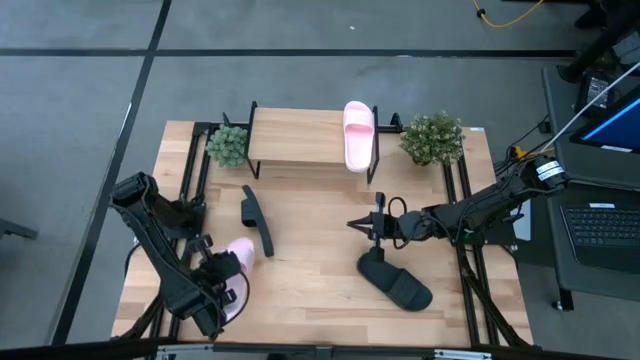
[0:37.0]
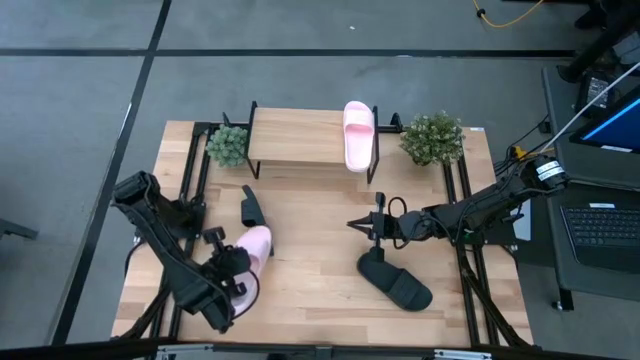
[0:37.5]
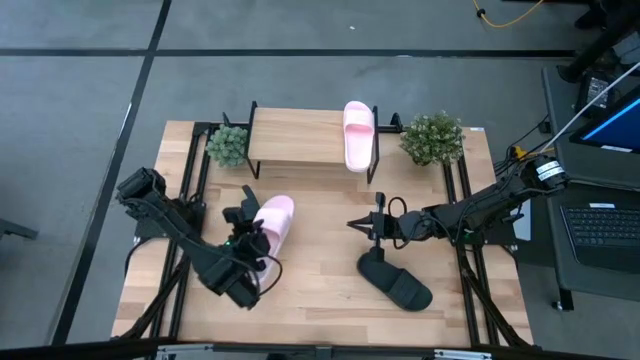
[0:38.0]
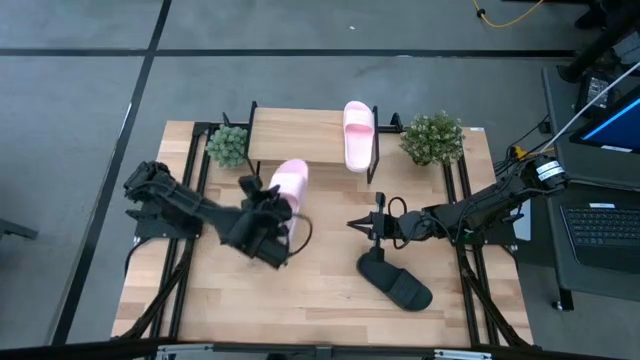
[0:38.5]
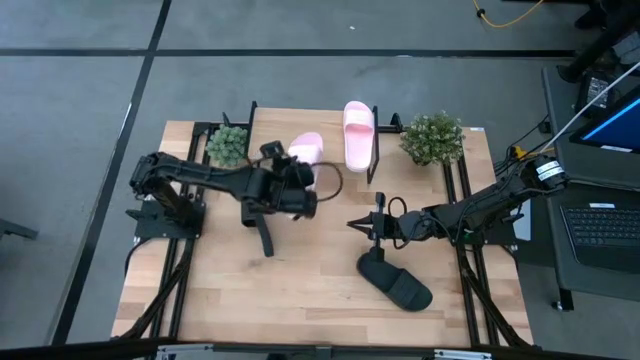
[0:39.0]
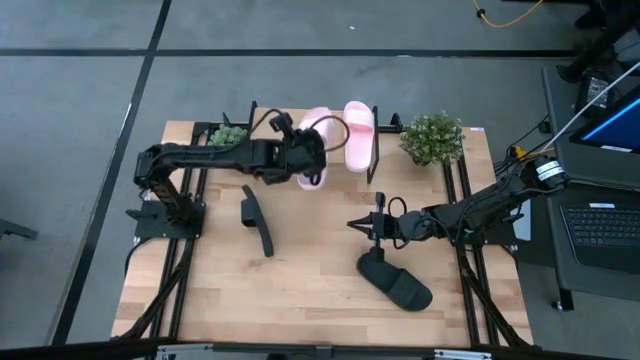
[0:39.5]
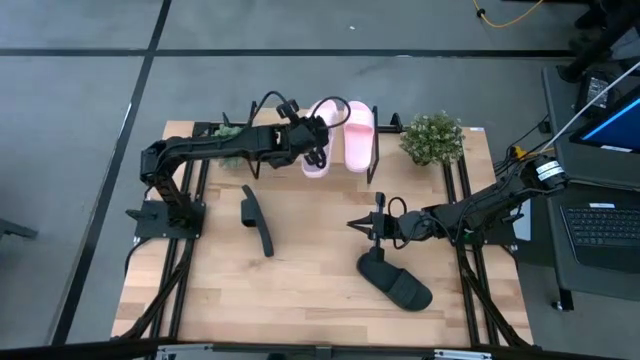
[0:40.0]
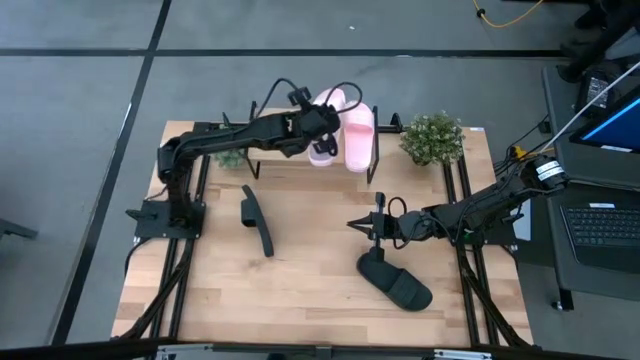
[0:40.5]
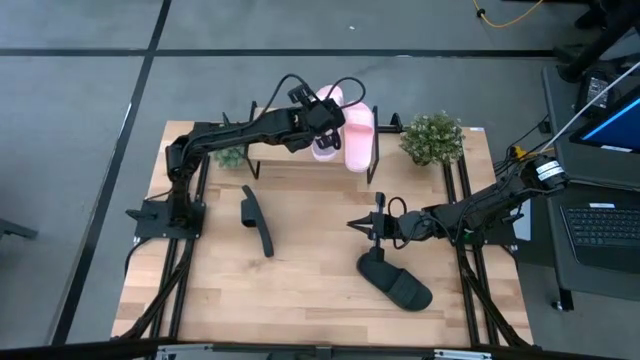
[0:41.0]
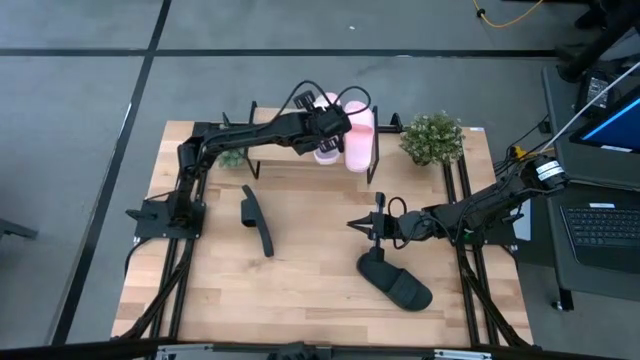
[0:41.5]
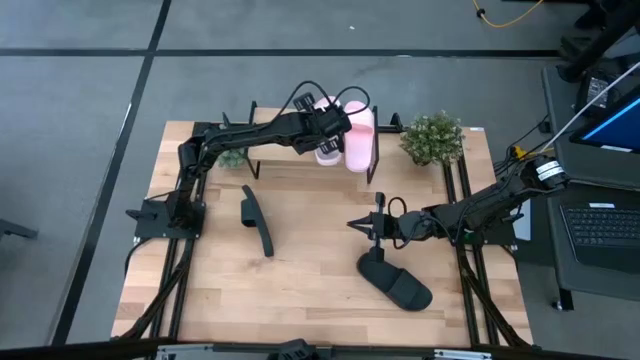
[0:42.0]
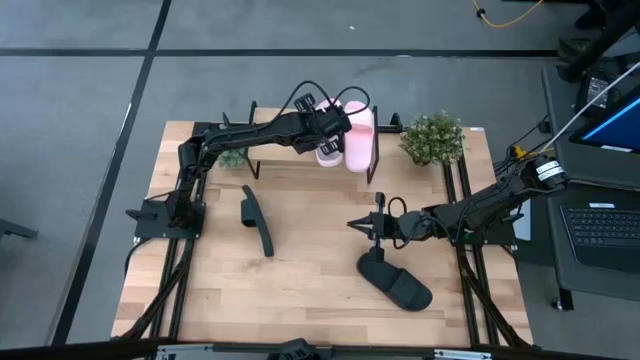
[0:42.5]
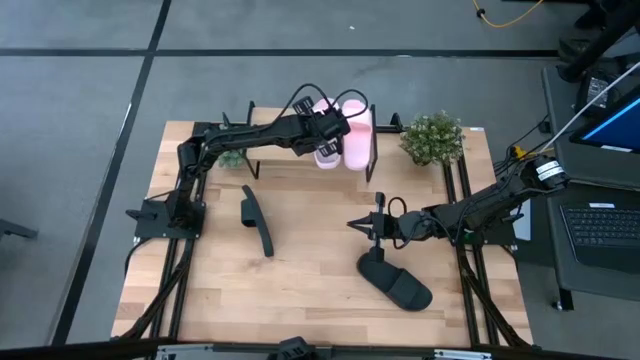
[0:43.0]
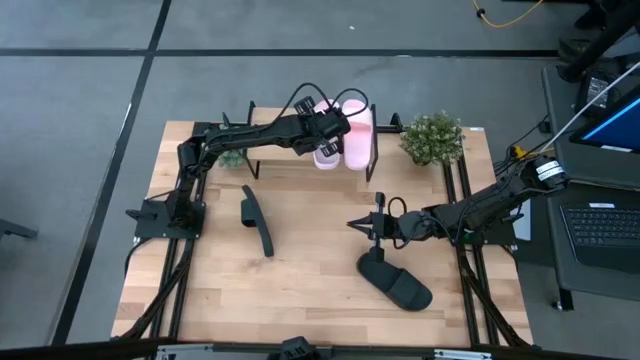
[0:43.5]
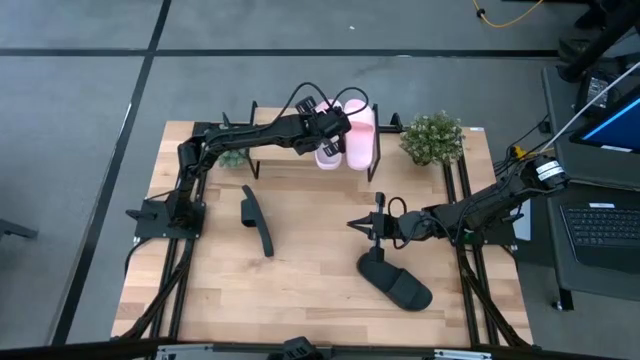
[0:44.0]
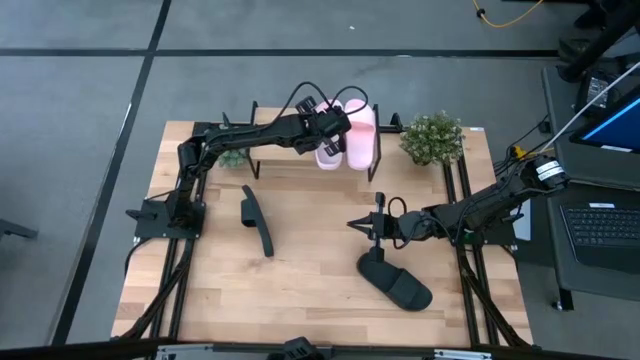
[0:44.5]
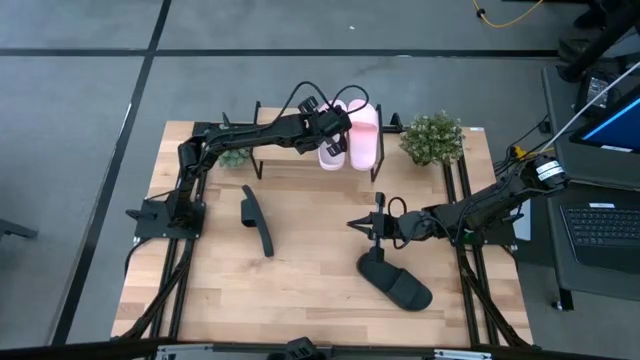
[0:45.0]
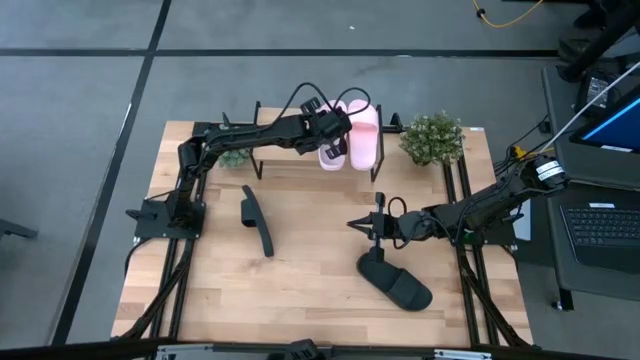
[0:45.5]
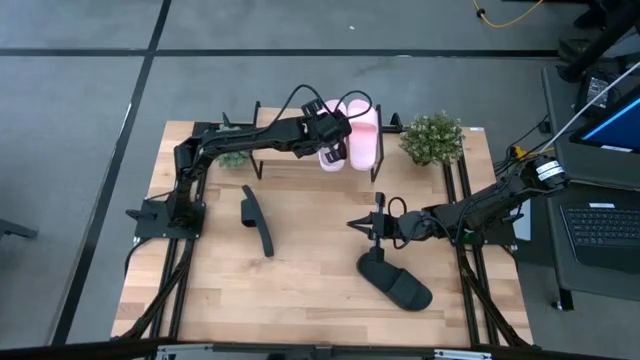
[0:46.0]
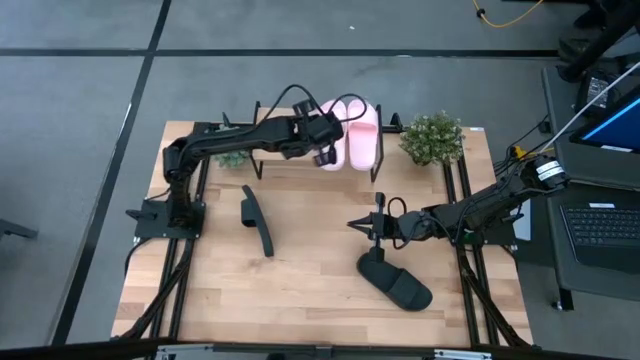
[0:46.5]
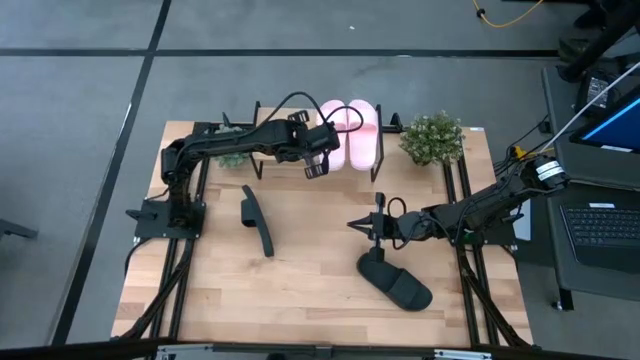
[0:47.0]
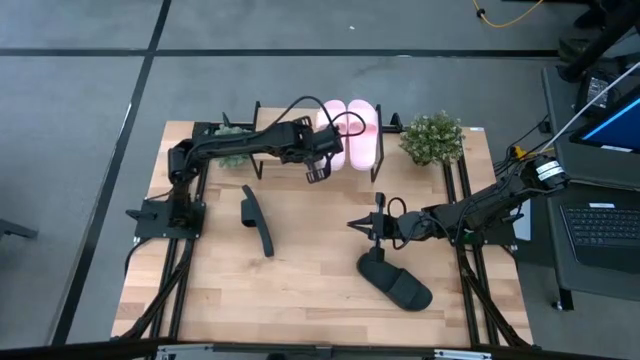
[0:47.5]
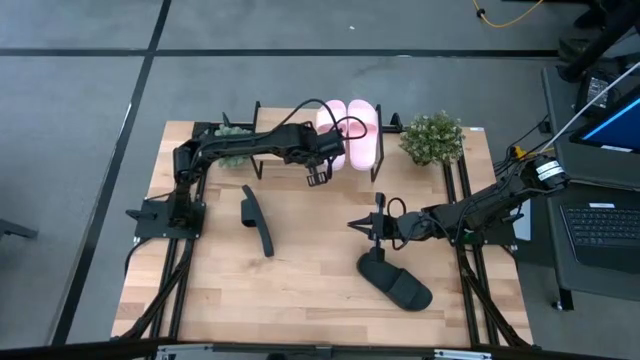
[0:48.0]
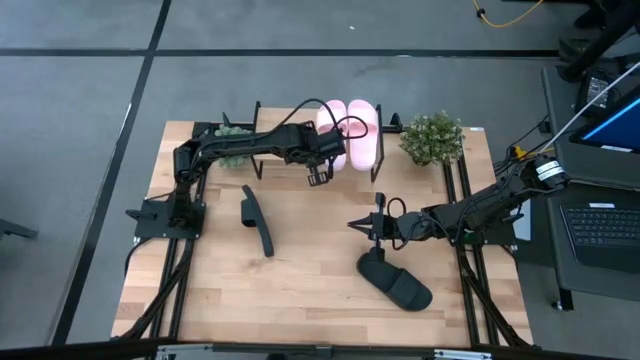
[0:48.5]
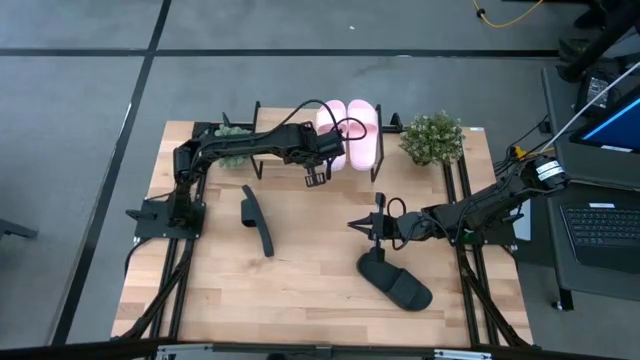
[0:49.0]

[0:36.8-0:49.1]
Task: Pick and place slides into the shelf
Put the pink slipper on the shelf

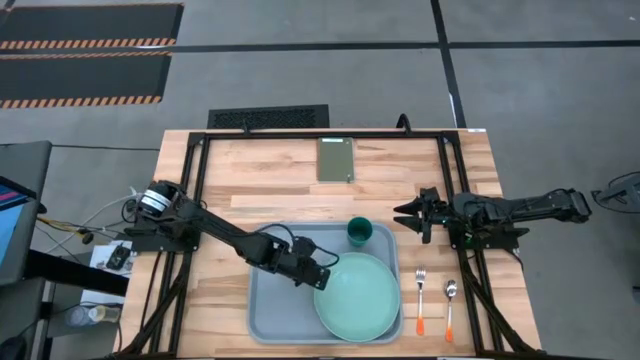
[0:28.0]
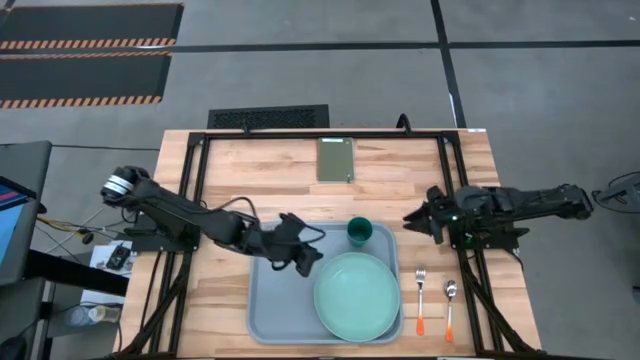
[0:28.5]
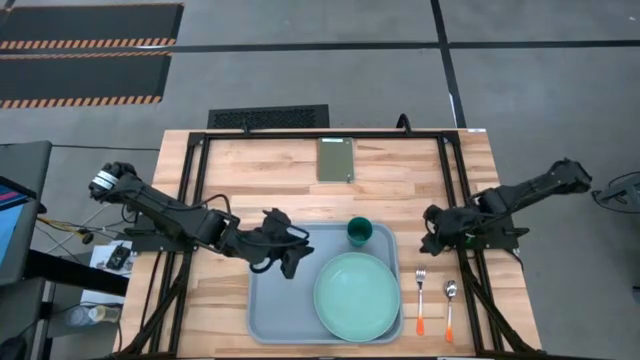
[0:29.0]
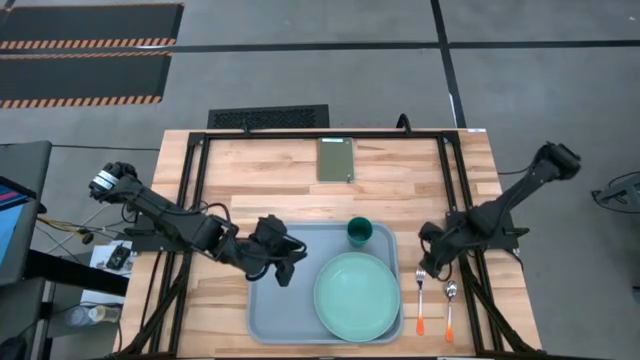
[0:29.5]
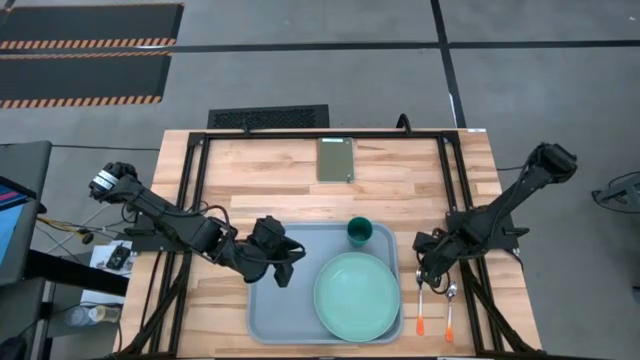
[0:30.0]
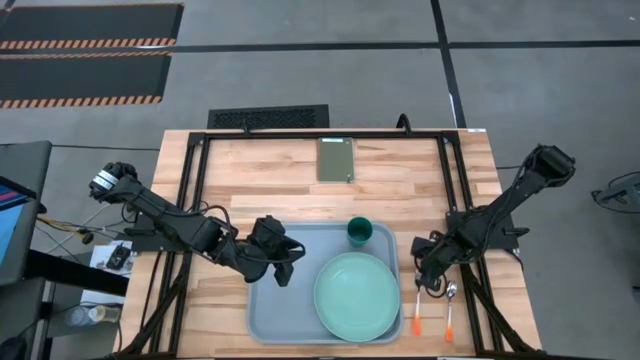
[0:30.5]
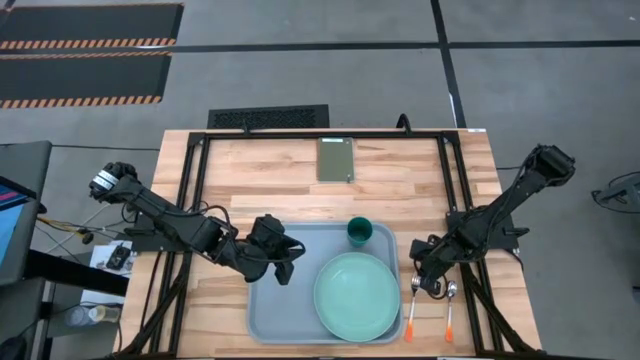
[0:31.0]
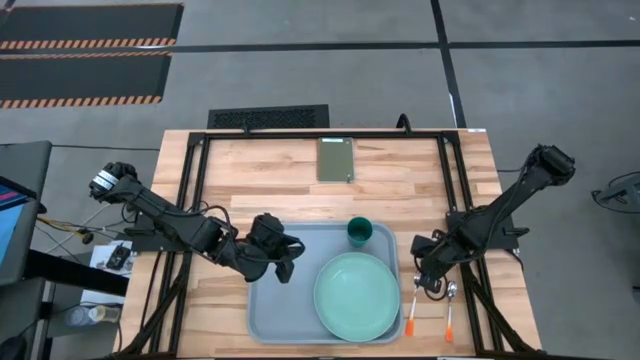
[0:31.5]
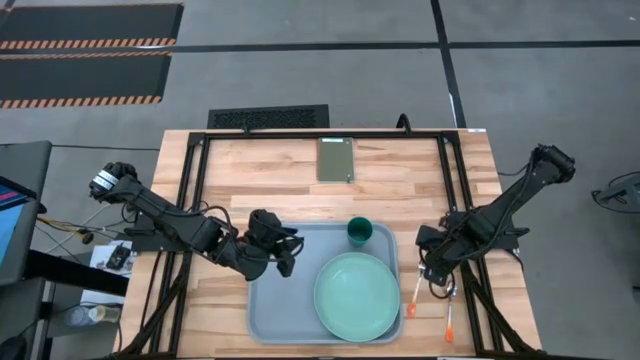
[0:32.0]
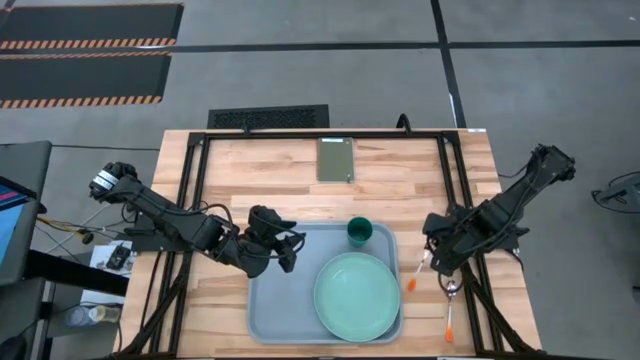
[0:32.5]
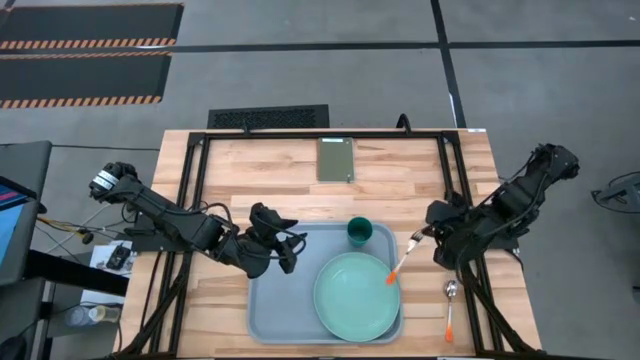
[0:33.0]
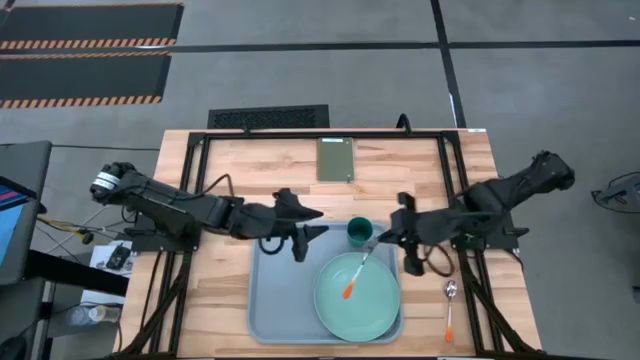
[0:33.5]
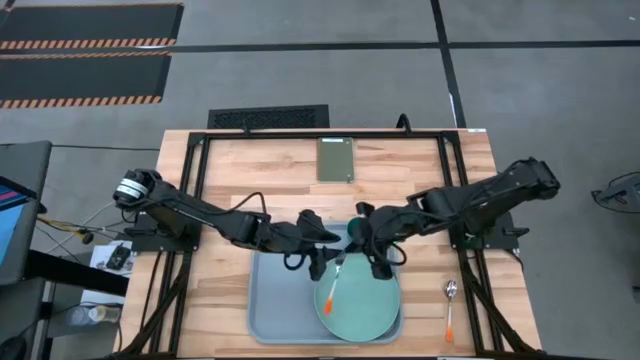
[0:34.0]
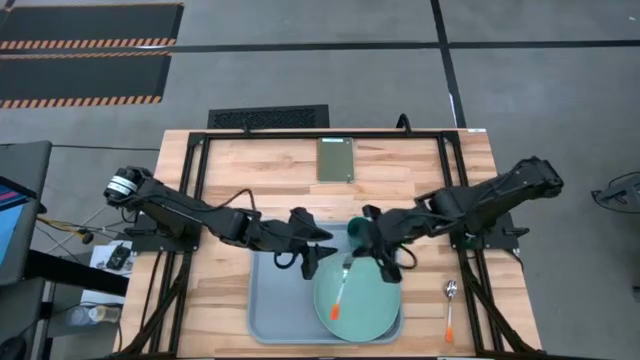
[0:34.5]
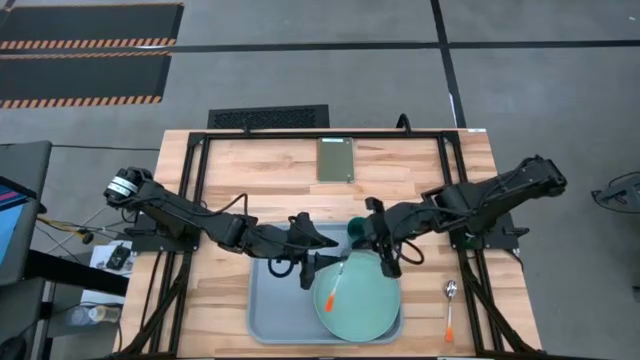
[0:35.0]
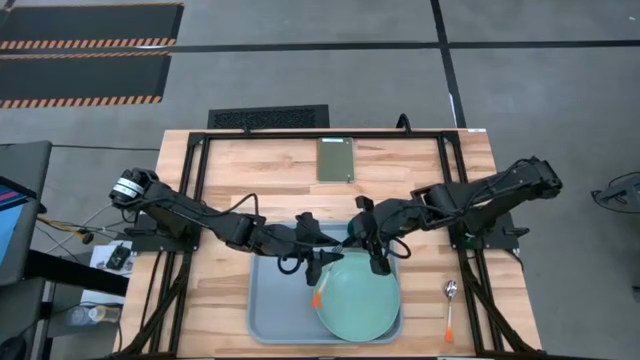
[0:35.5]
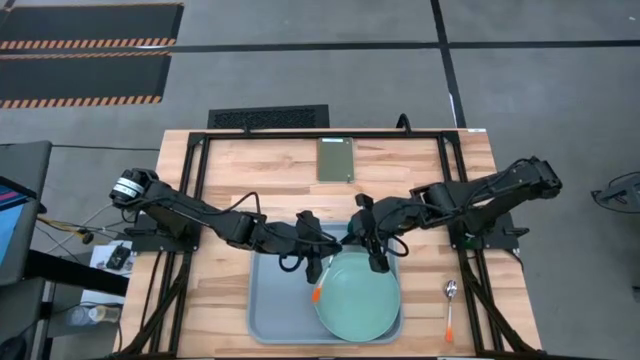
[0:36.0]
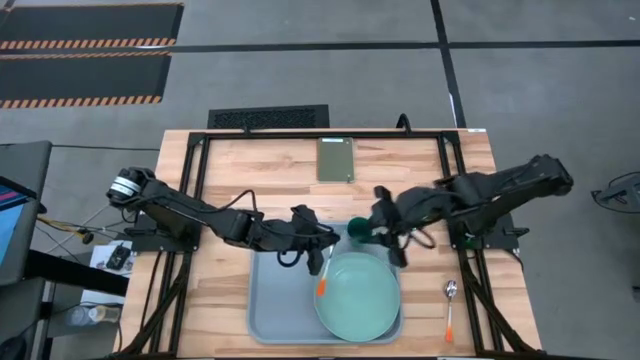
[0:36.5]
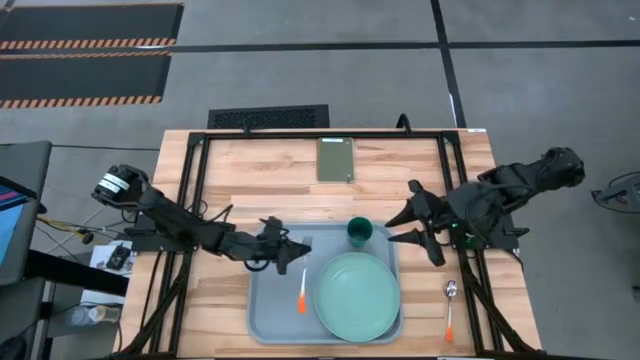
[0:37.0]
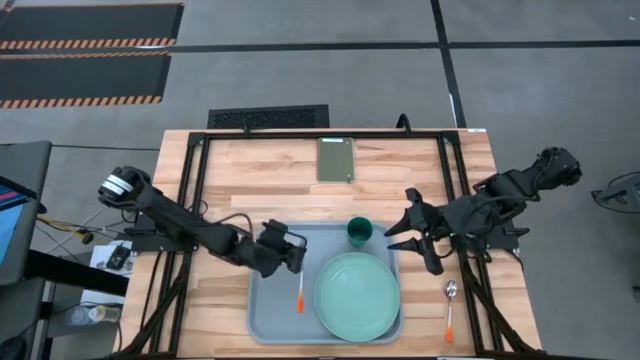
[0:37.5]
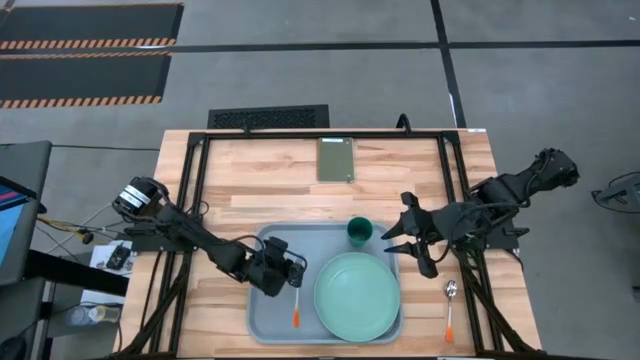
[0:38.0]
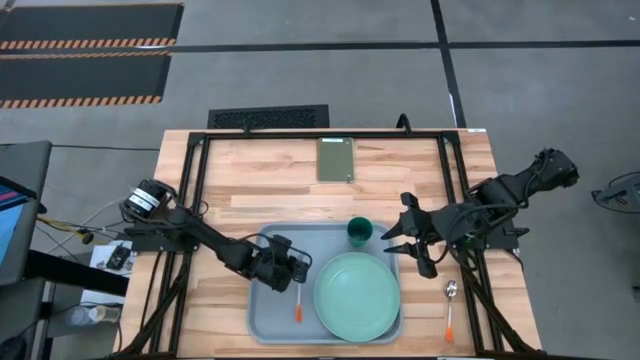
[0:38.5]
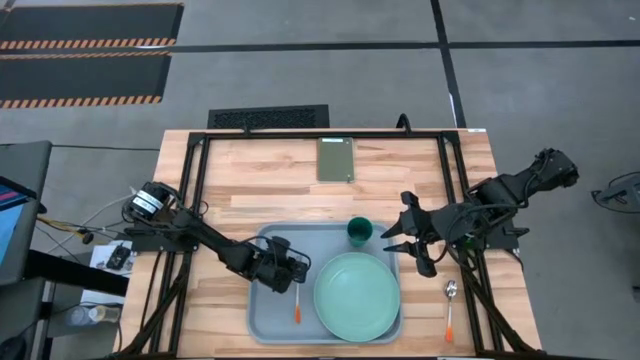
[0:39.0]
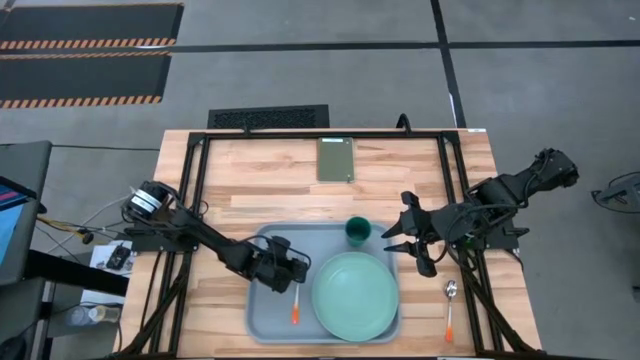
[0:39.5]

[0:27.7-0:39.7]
Task: Pick and place plate/cup/fork/spoon on tray
Put the orange fork on the blue tray to the left of the blue plate
